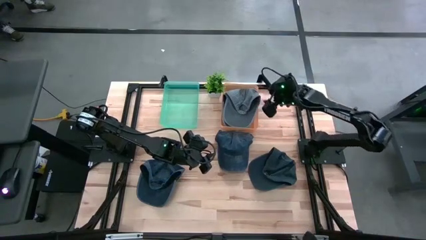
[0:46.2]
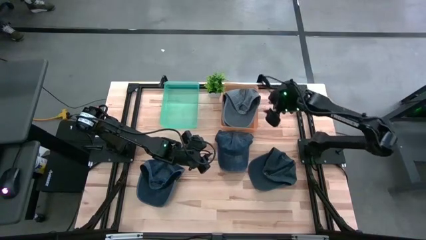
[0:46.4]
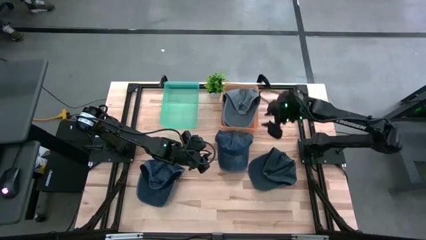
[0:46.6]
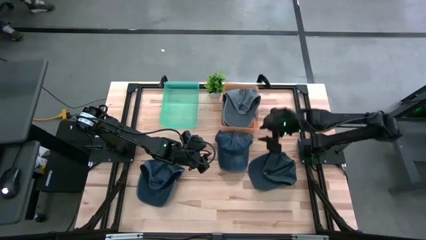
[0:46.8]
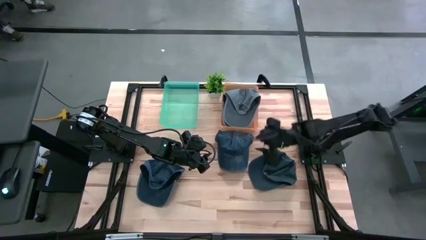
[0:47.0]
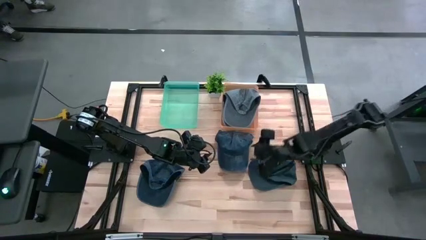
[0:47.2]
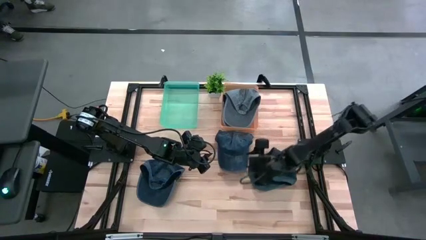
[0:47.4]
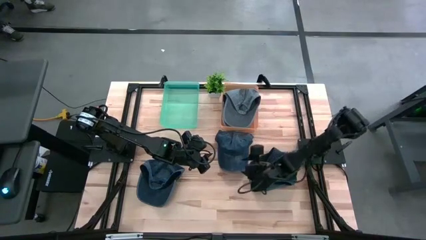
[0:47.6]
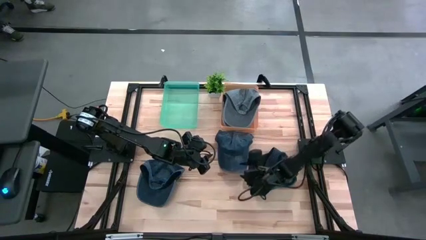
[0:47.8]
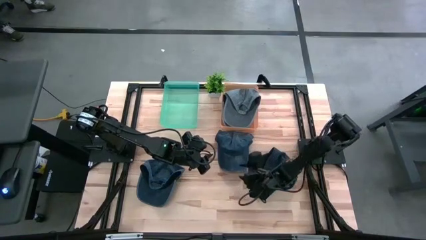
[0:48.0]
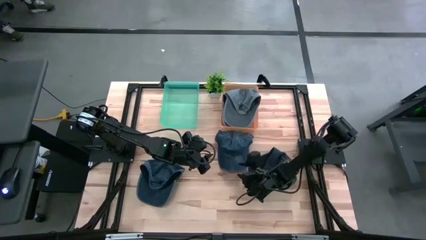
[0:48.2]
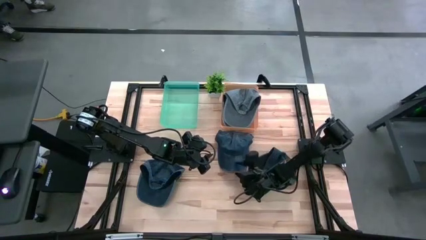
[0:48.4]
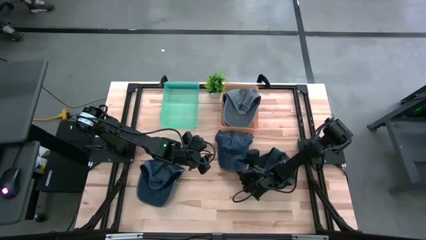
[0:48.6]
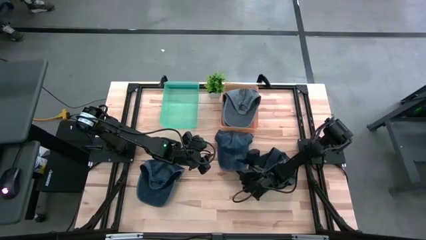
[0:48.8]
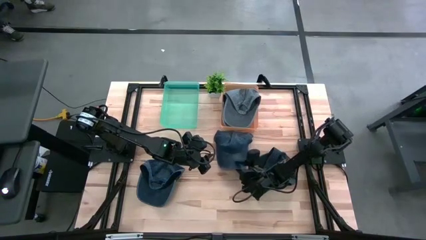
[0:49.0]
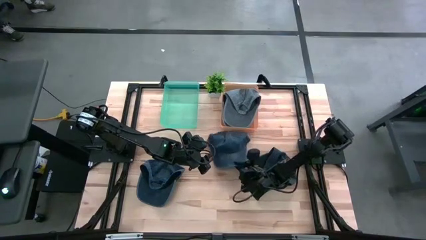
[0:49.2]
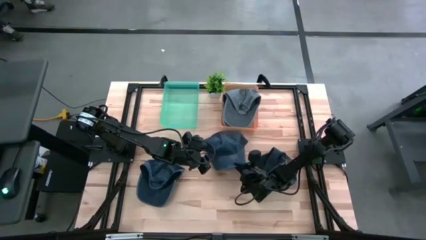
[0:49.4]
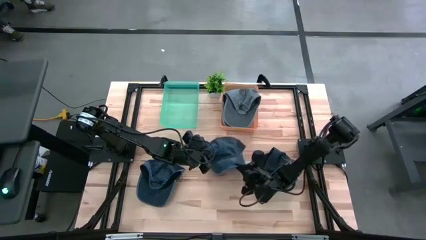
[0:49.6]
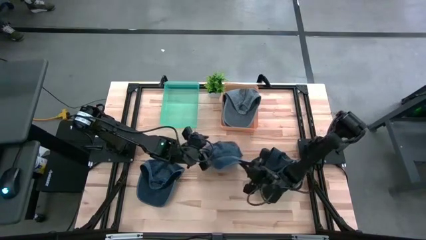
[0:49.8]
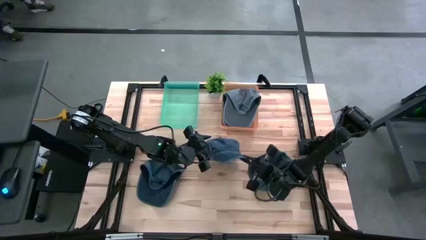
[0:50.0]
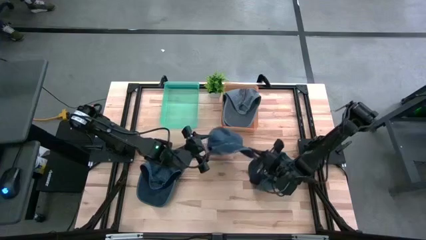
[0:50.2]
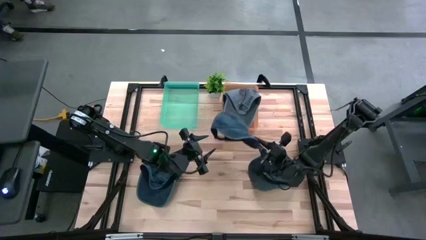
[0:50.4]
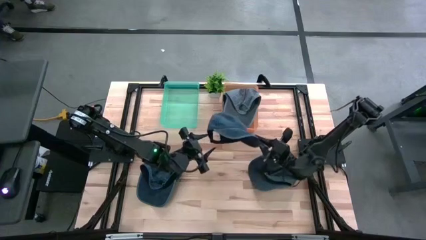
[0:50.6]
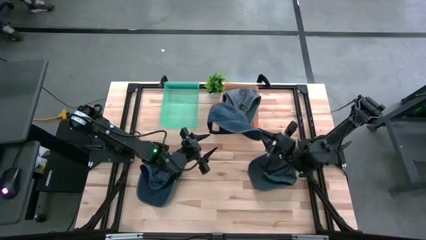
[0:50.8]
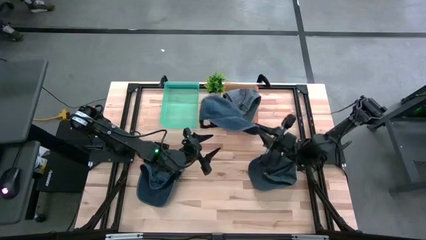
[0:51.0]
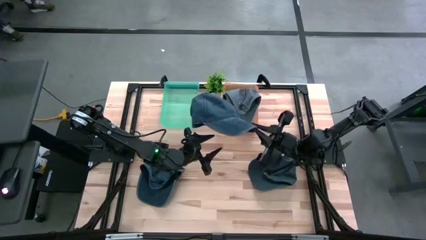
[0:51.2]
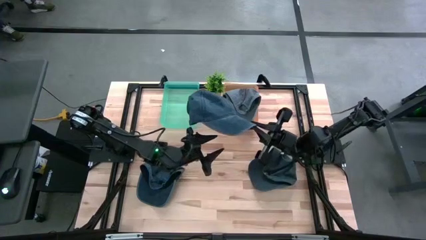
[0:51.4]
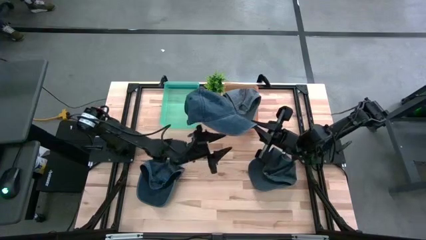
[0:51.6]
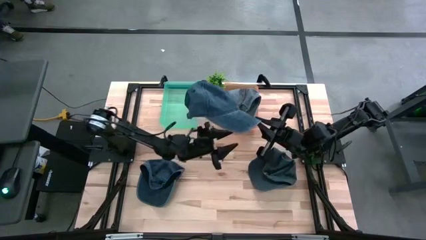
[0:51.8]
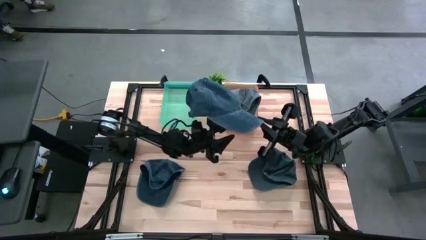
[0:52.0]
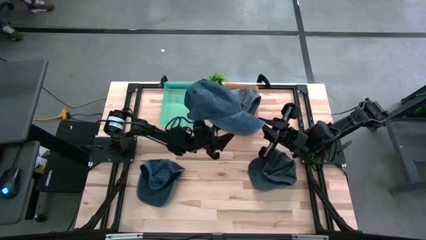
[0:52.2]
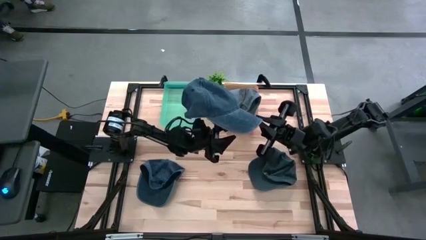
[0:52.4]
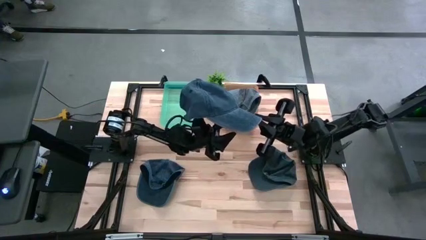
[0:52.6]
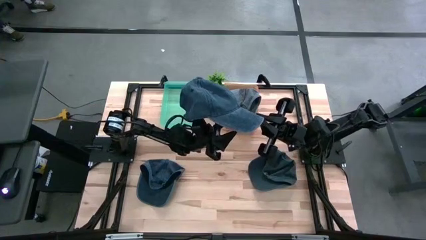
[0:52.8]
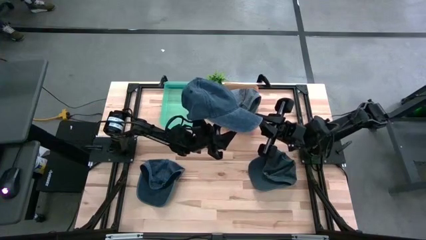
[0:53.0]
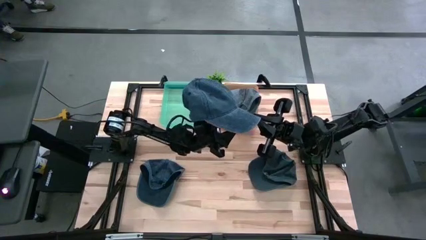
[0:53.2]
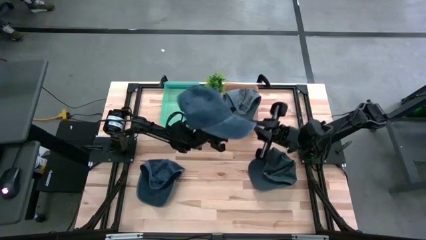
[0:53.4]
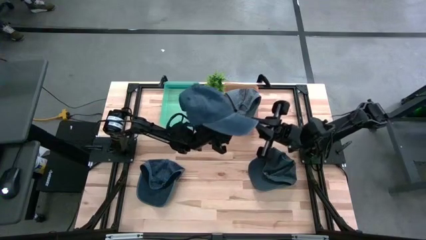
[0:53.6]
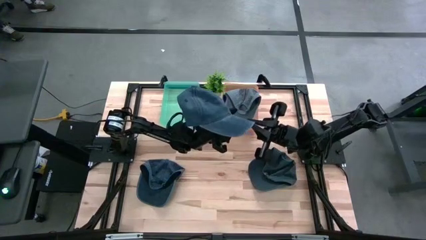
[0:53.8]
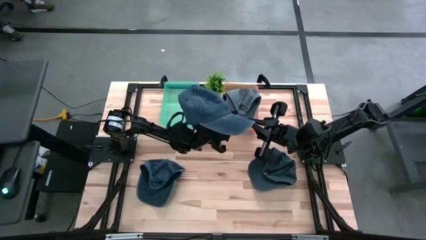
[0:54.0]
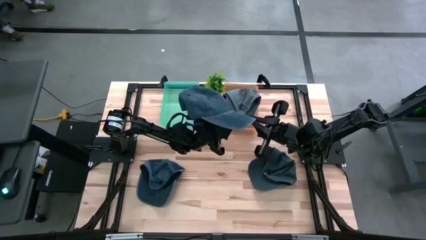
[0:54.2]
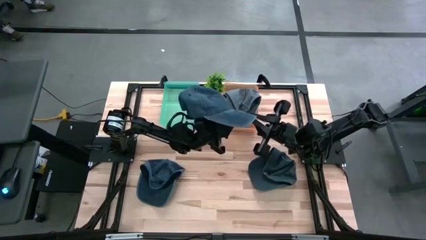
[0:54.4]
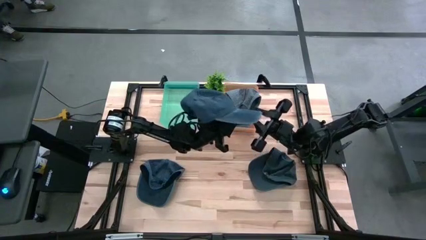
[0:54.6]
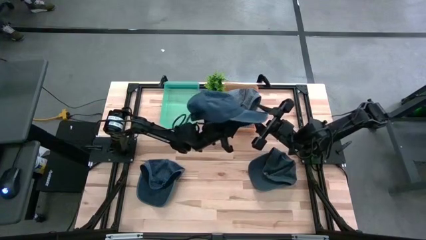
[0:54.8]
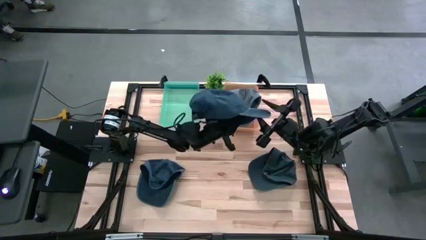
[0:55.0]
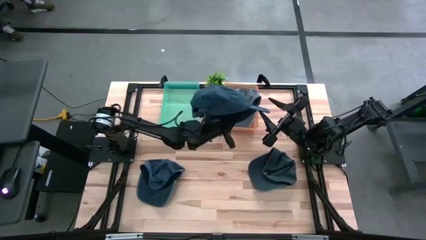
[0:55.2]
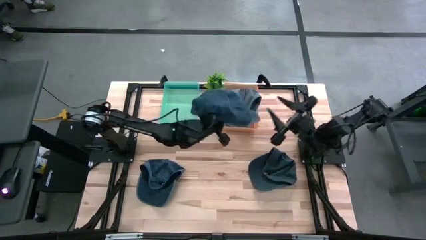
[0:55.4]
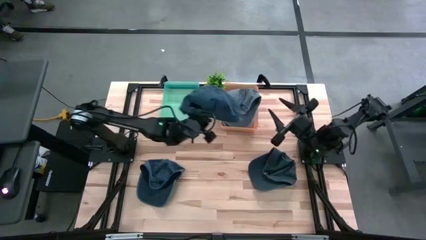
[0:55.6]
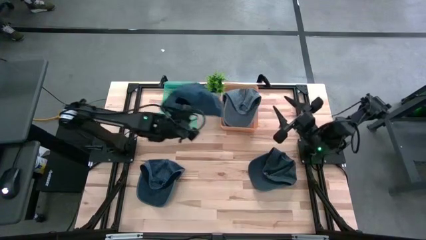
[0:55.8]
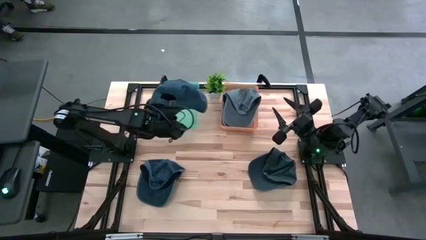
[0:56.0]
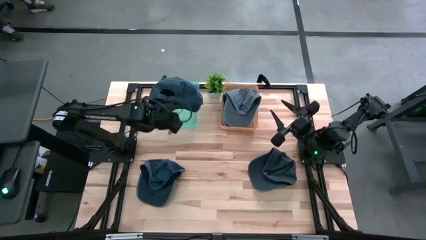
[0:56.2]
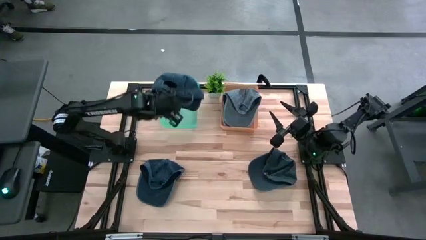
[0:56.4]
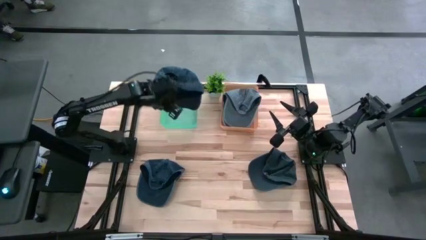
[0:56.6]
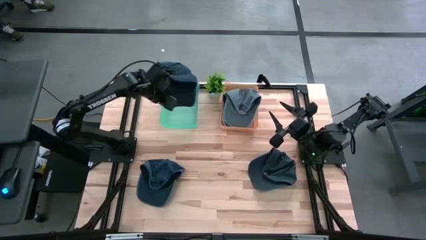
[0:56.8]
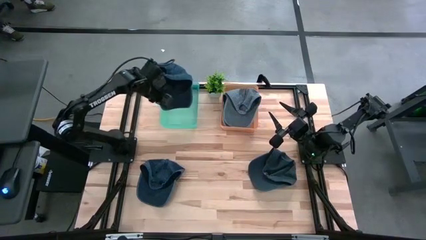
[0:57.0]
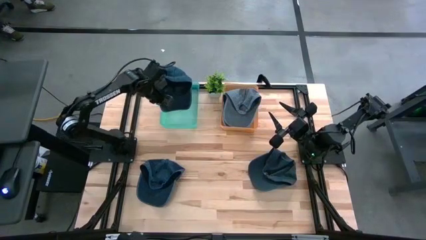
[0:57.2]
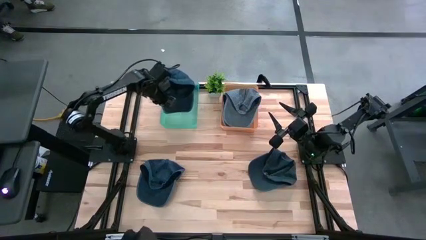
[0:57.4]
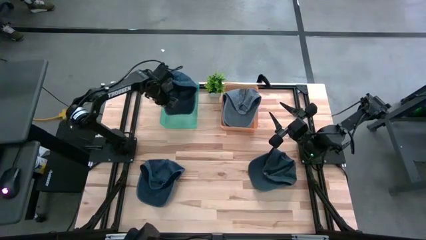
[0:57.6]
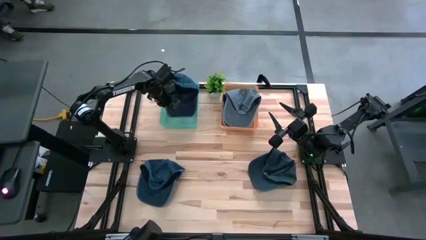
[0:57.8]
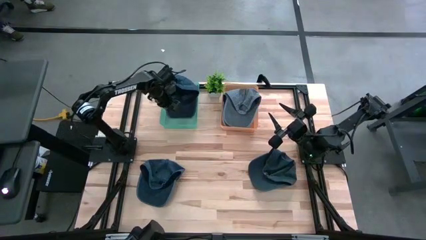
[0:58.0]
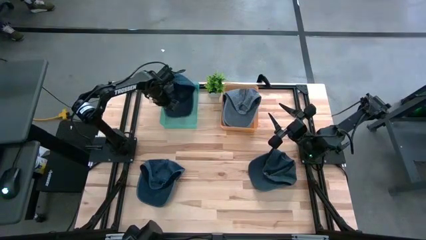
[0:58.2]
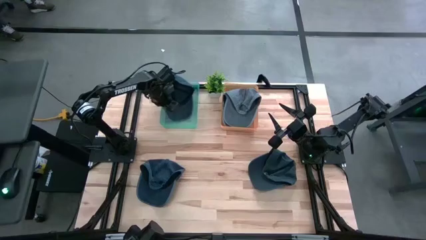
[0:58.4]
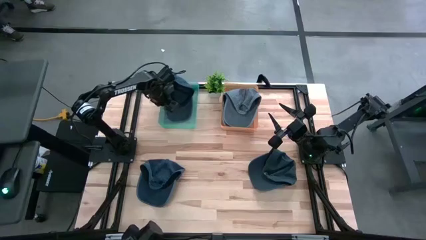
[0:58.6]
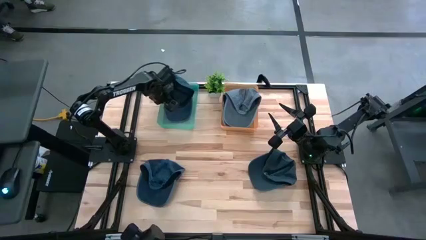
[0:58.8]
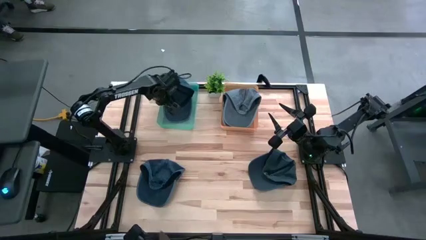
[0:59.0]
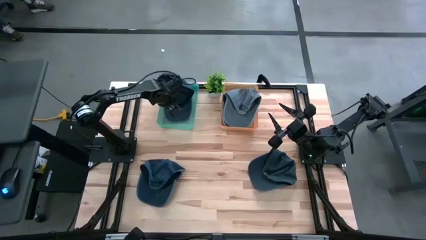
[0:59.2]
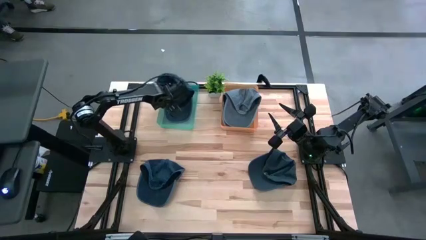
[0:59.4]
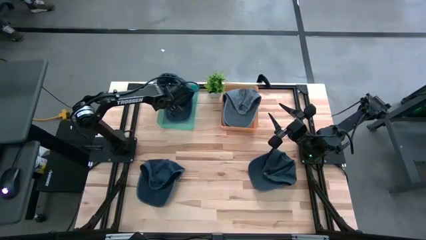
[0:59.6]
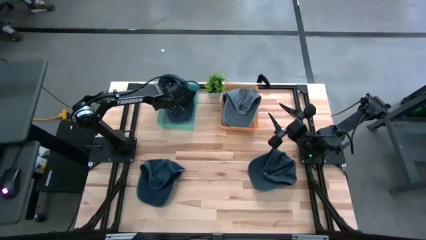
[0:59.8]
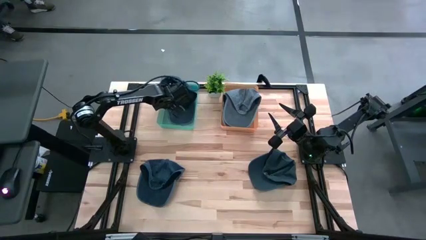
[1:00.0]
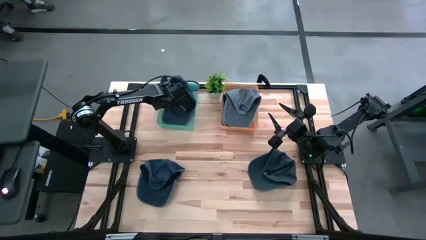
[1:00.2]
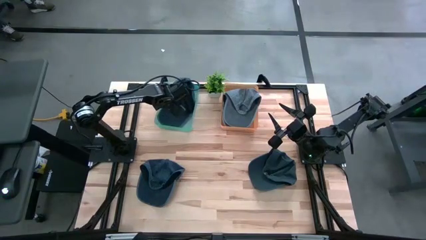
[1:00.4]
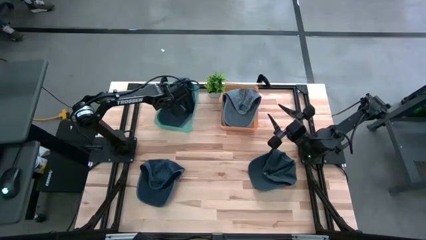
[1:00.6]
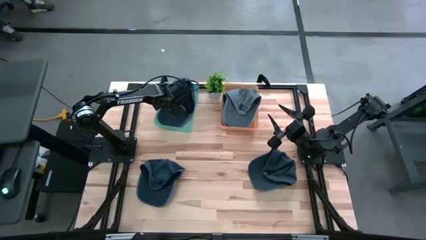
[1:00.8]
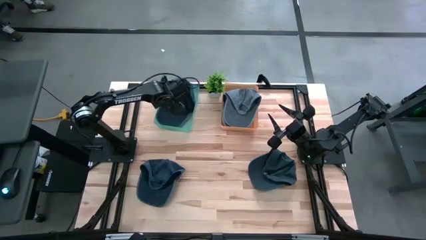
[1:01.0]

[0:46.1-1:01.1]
Task: Pick & Place hat
Put the middle dark gray cap into the green bin

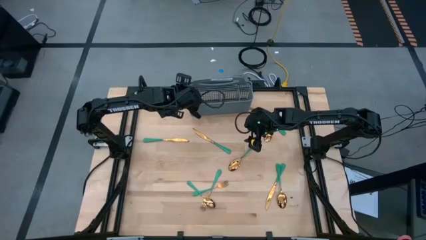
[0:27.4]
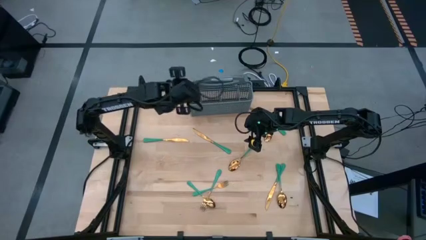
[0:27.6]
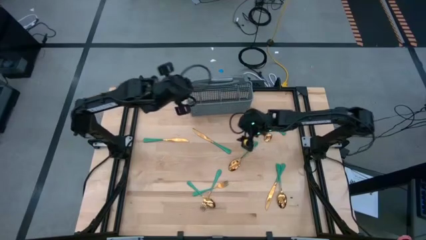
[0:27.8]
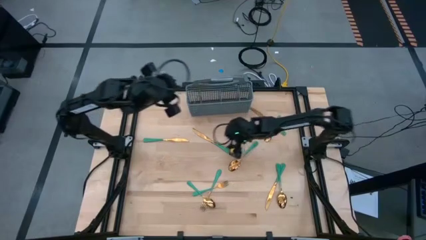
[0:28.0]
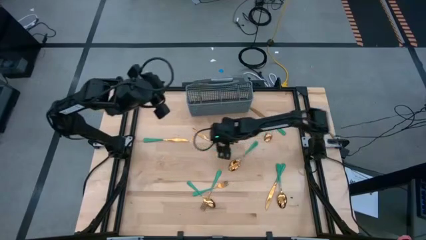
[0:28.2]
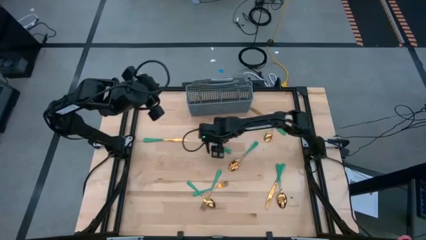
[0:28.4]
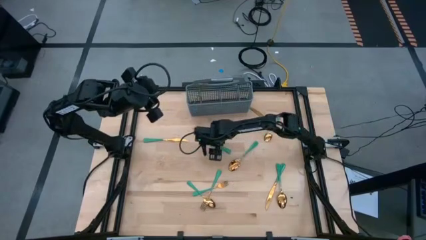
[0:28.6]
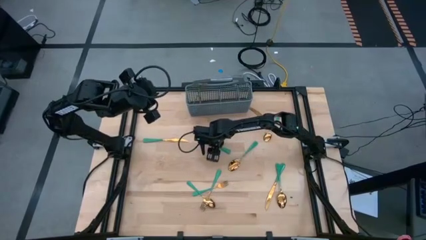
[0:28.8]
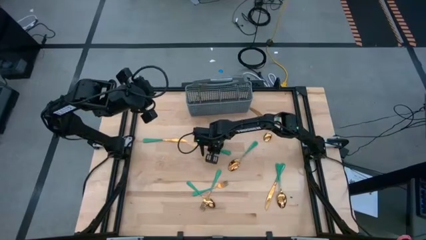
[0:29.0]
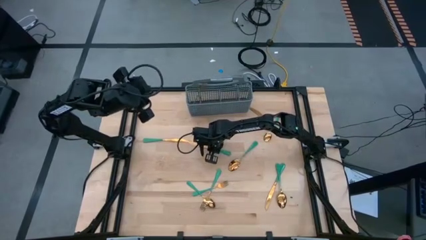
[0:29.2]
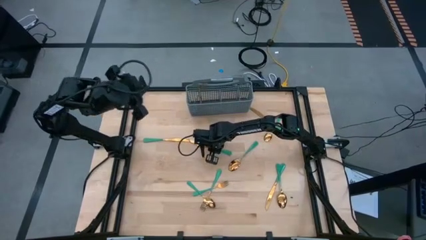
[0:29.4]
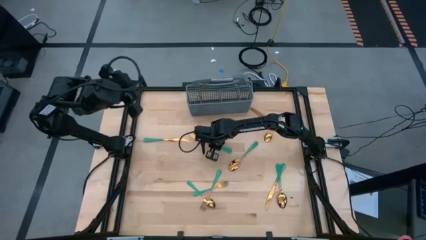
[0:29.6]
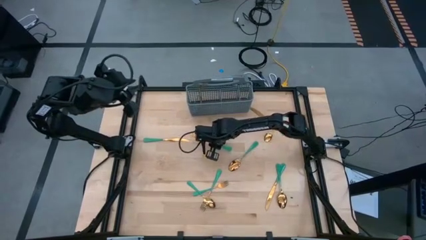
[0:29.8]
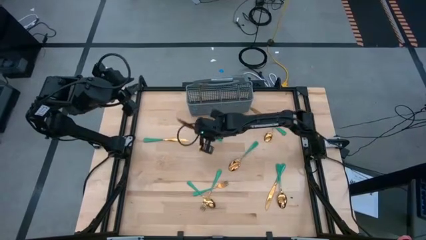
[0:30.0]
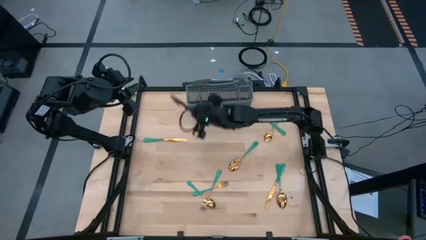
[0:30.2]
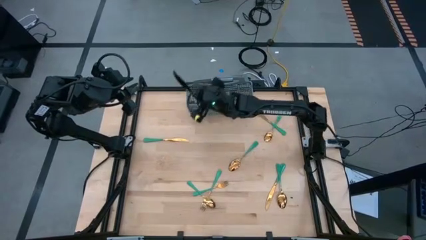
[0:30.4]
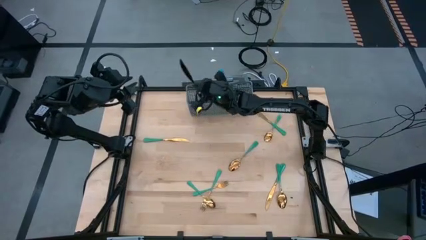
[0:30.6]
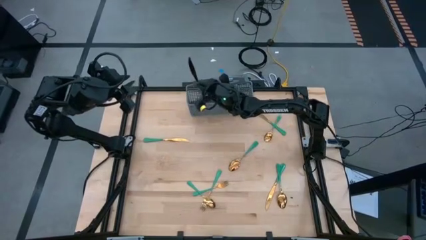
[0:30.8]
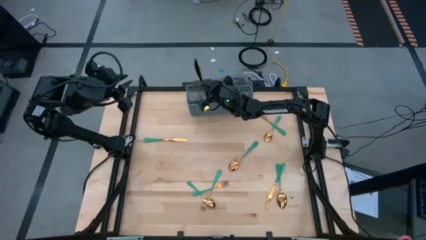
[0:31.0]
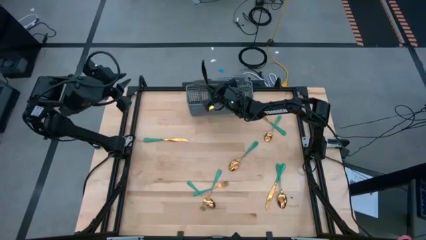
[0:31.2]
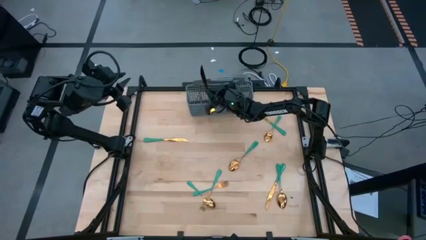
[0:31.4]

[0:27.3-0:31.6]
Task: Sort silverware
Put the gold knife into the middle left section of the gray utensil holder
